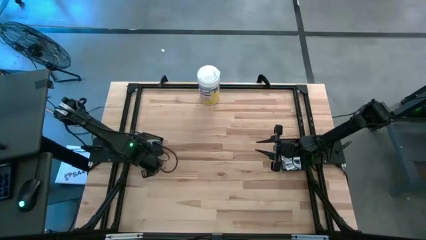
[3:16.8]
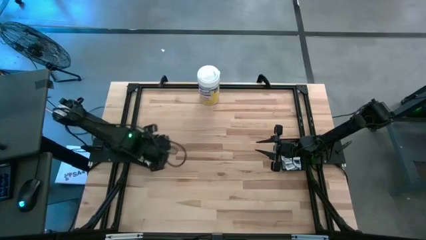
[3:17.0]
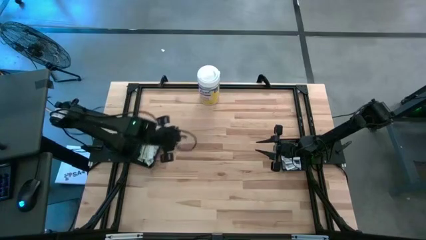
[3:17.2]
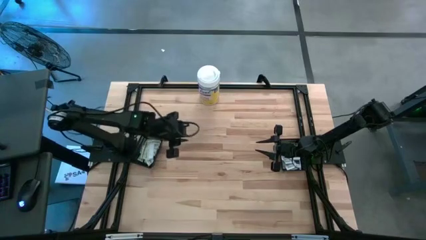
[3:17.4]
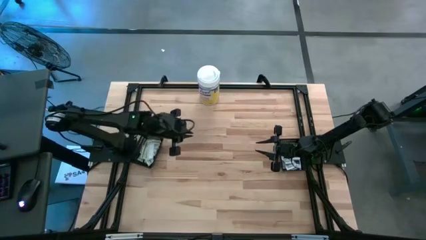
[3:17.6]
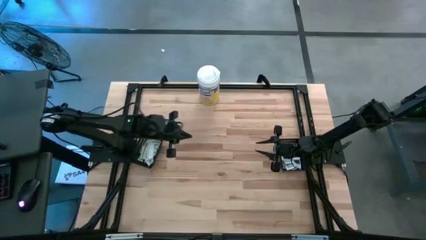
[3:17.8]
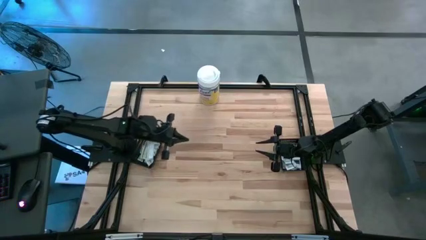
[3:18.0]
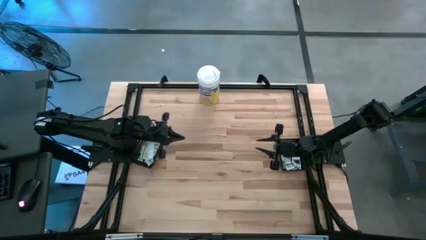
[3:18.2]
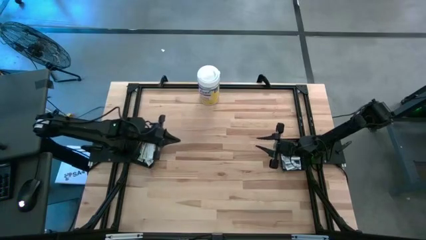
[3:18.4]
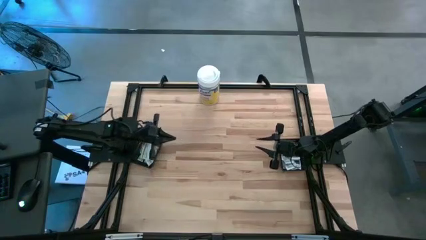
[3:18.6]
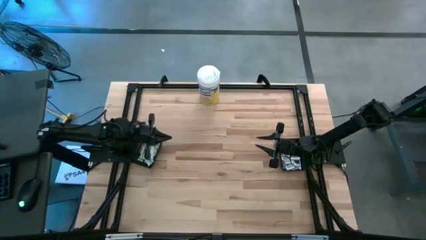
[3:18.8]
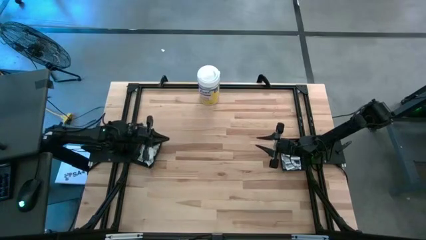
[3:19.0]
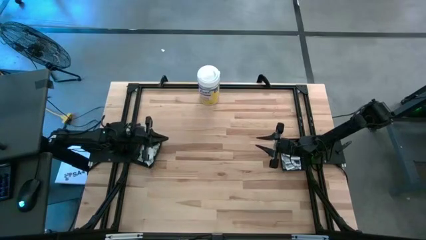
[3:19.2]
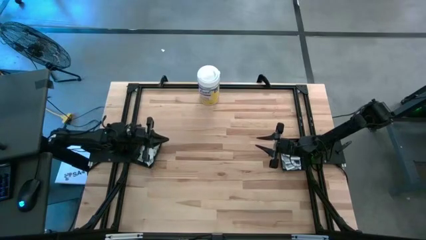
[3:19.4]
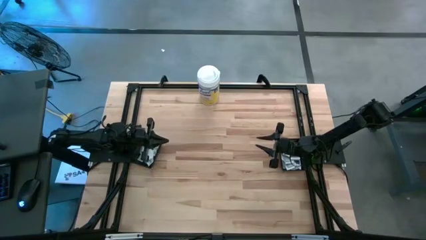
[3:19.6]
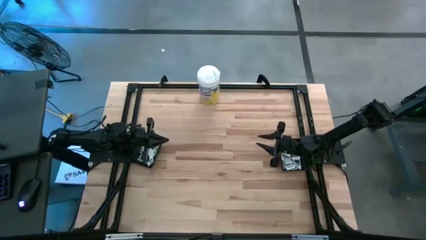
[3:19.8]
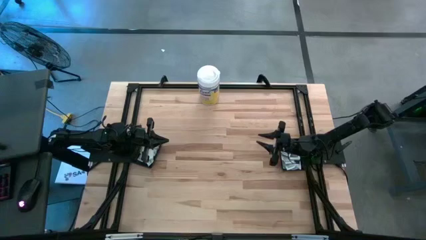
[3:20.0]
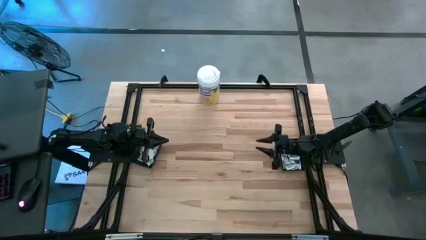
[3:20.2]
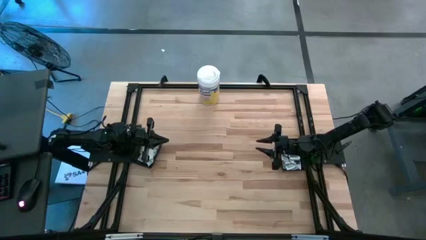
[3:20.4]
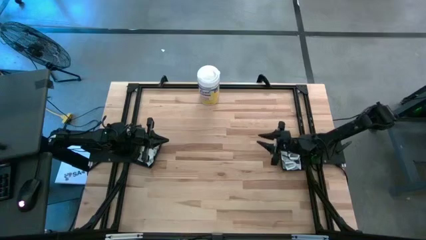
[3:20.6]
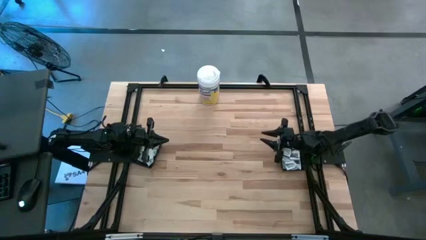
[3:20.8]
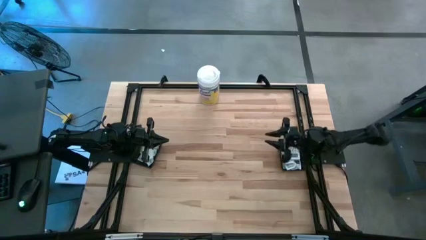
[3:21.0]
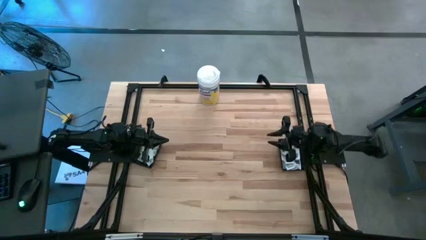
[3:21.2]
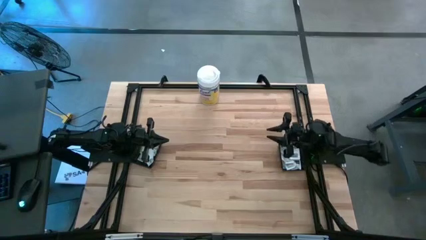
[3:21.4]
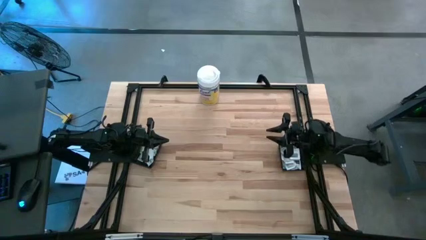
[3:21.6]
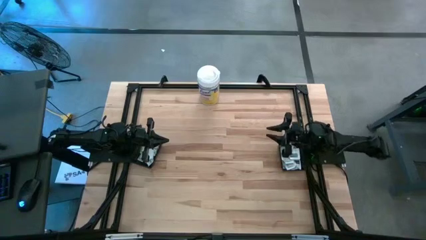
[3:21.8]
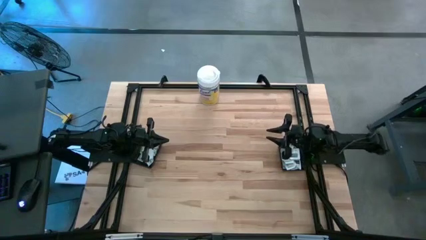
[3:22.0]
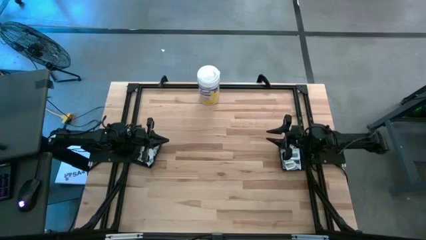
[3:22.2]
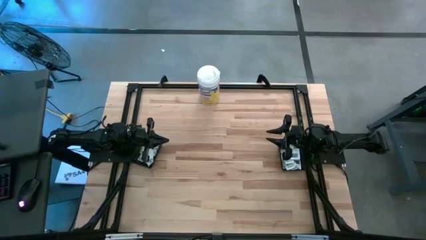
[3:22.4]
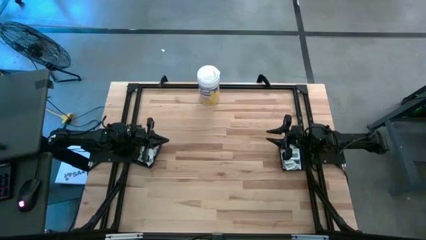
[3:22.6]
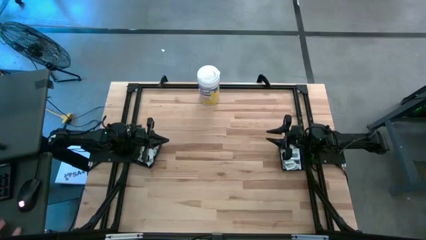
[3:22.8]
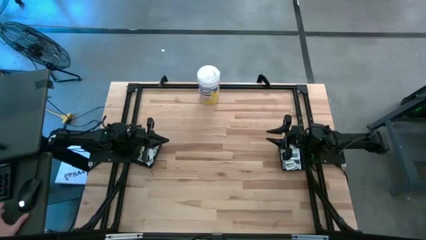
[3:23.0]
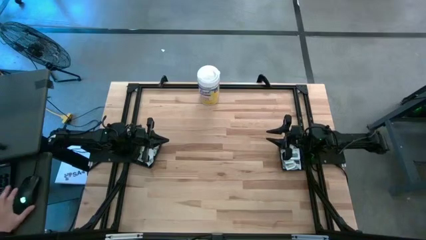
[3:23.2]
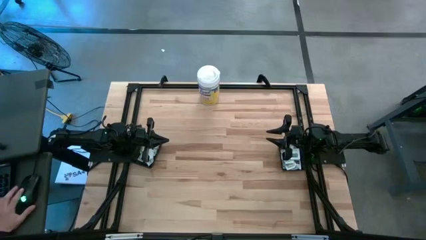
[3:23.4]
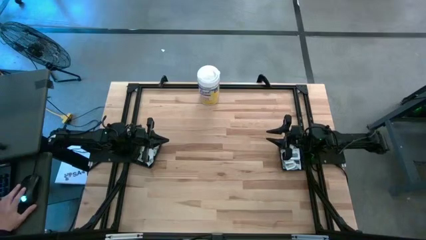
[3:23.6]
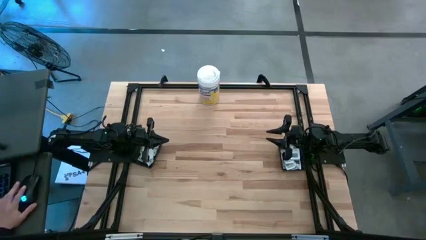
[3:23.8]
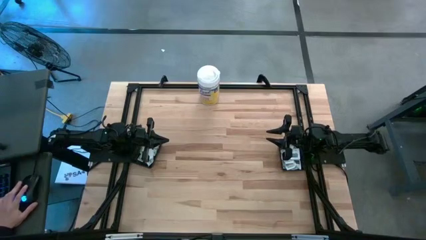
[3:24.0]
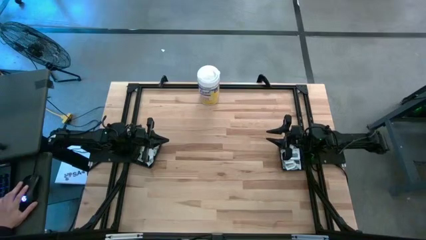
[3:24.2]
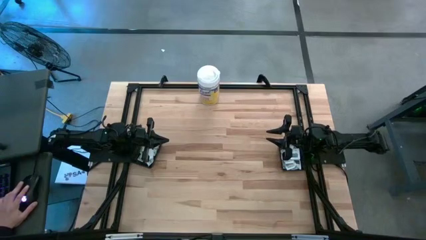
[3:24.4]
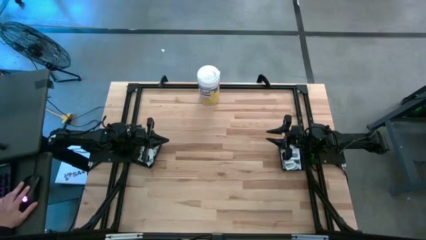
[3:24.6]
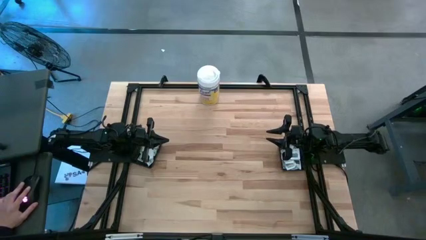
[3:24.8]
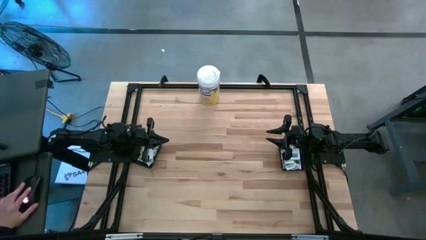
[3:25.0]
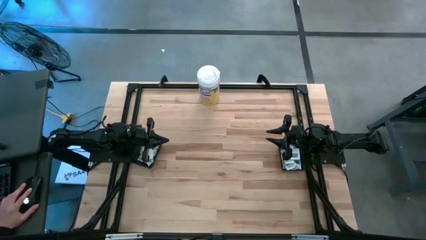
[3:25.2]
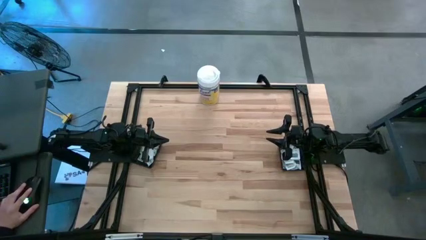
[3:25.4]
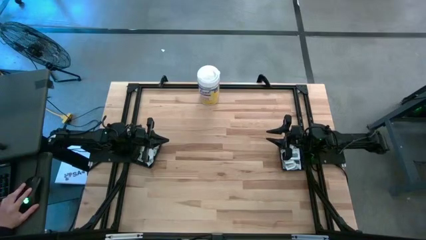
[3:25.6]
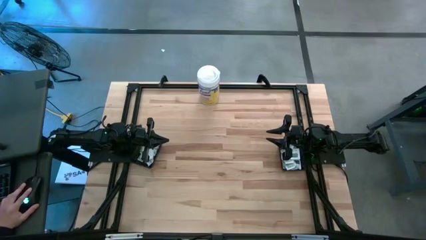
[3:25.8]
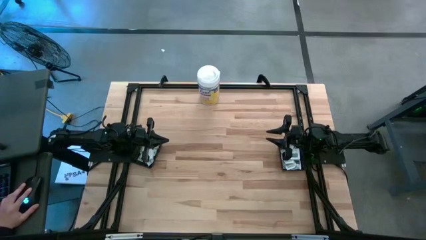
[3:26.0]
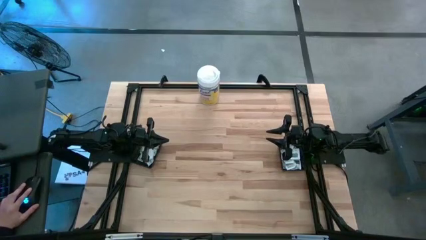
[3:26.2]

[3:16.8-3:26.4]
Task: Pick & Place First Aid Supplies
Return to Home Position

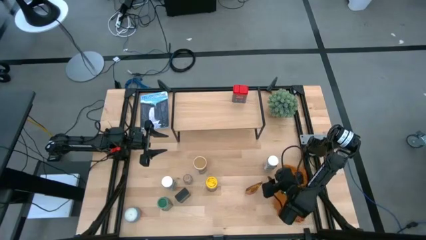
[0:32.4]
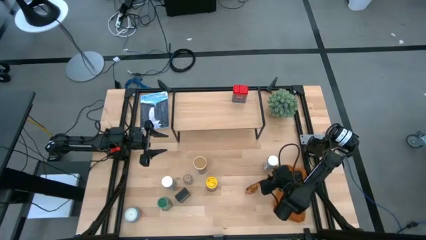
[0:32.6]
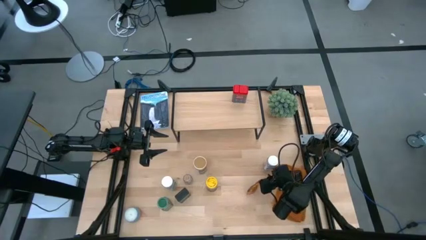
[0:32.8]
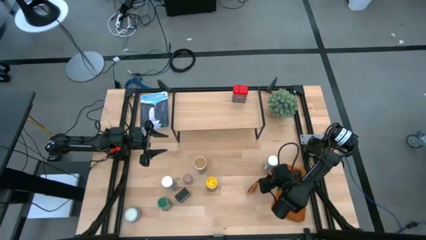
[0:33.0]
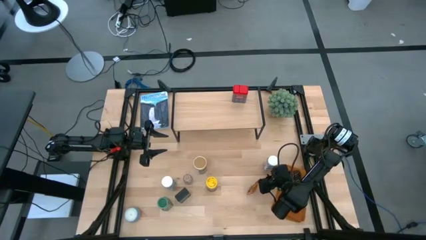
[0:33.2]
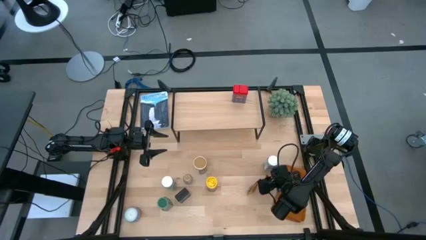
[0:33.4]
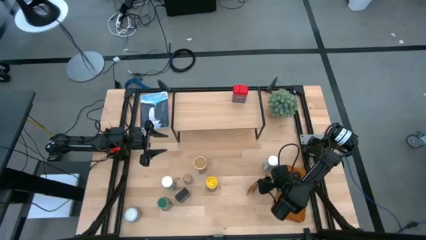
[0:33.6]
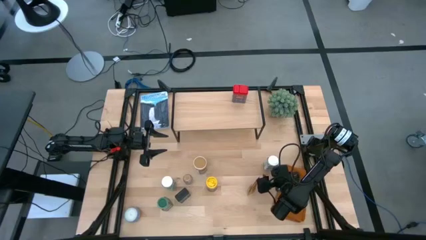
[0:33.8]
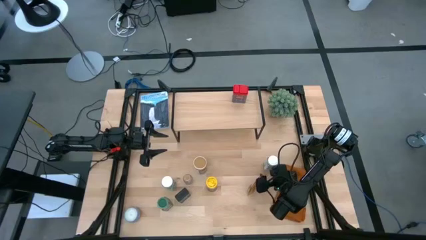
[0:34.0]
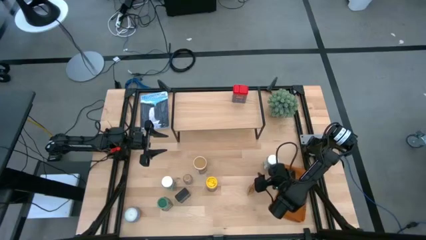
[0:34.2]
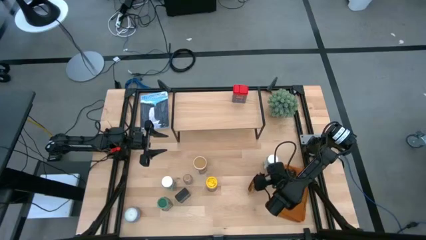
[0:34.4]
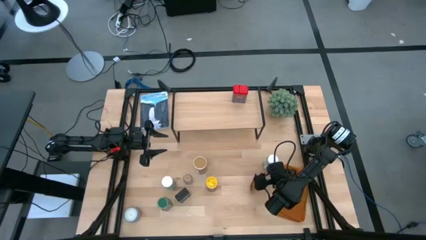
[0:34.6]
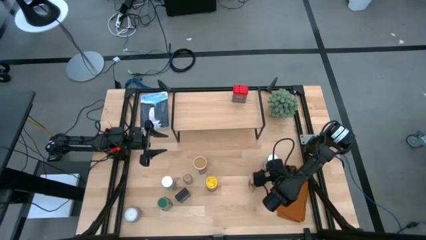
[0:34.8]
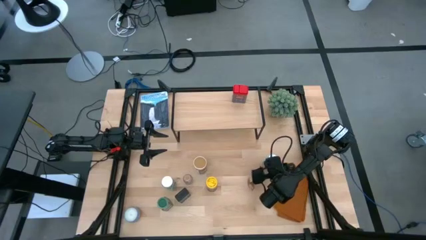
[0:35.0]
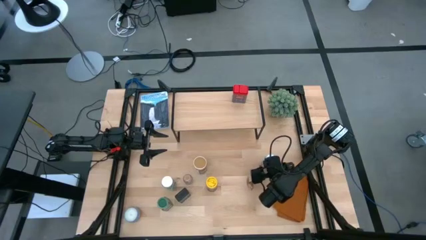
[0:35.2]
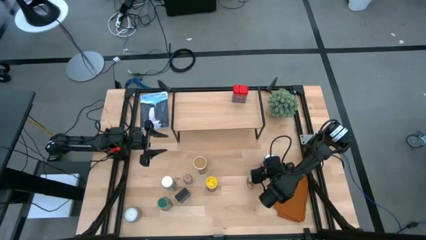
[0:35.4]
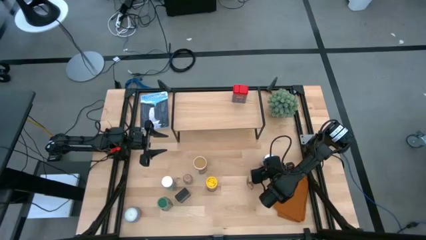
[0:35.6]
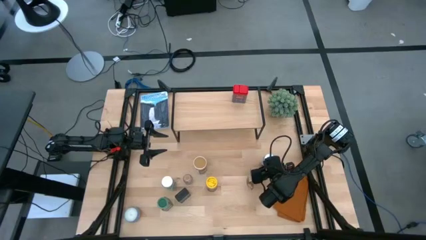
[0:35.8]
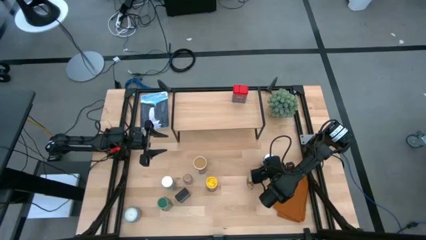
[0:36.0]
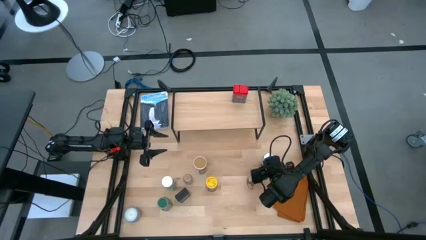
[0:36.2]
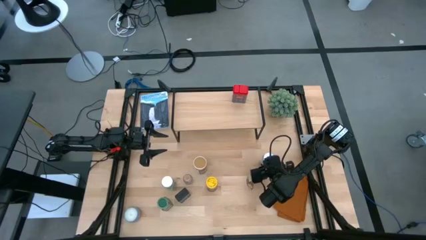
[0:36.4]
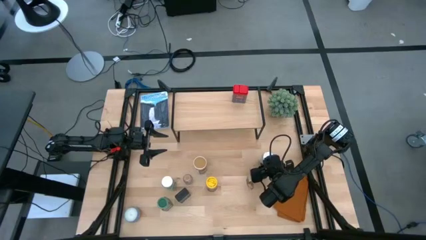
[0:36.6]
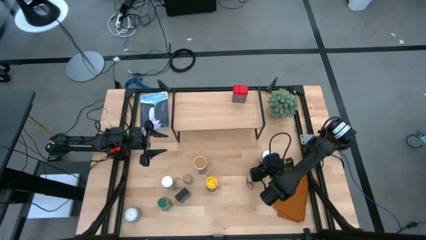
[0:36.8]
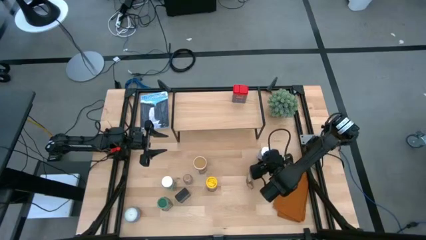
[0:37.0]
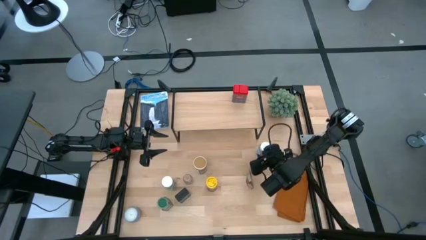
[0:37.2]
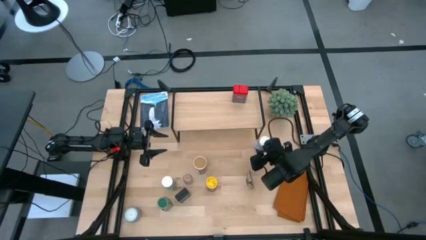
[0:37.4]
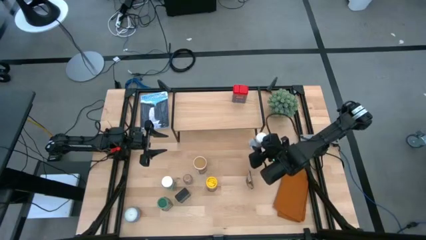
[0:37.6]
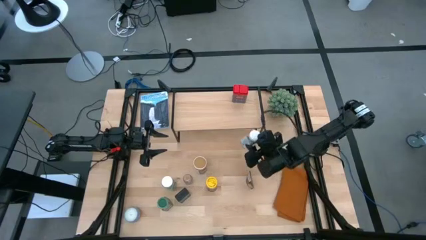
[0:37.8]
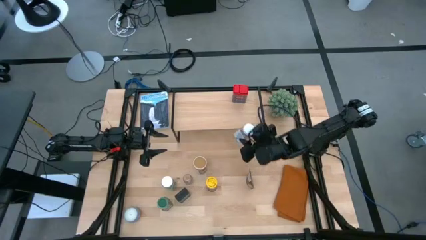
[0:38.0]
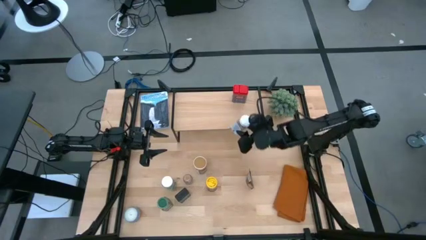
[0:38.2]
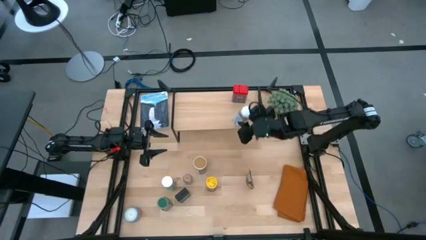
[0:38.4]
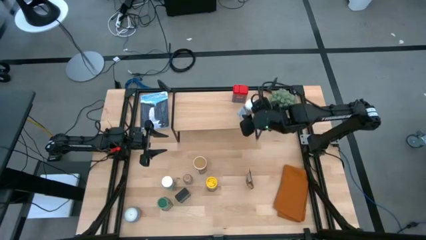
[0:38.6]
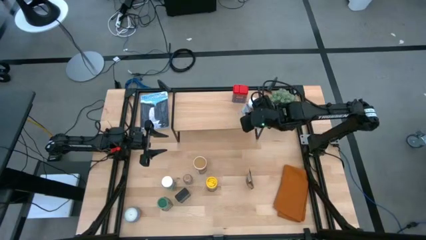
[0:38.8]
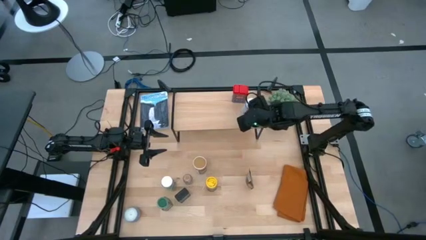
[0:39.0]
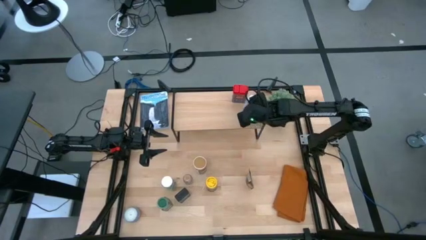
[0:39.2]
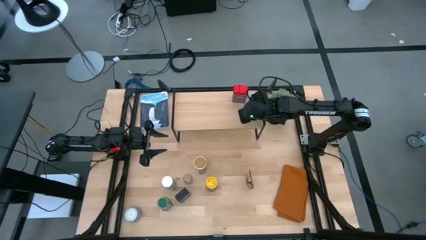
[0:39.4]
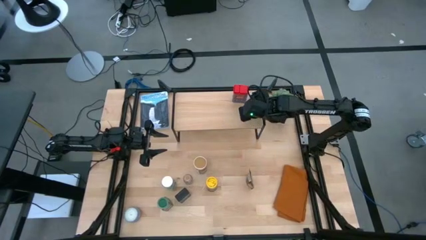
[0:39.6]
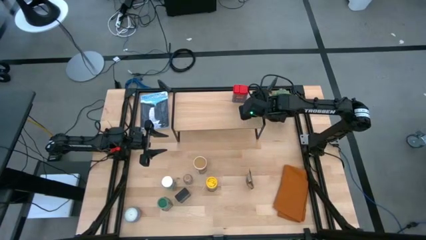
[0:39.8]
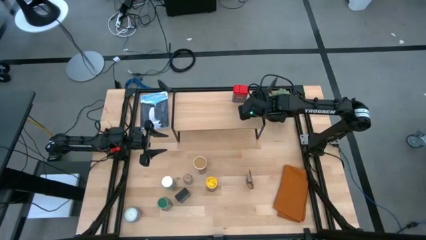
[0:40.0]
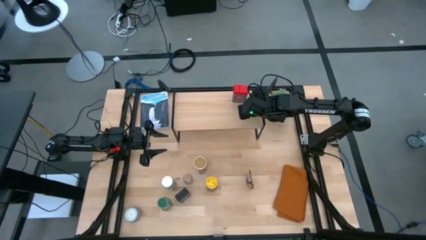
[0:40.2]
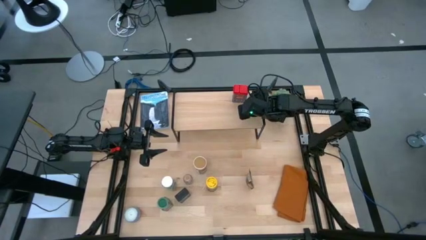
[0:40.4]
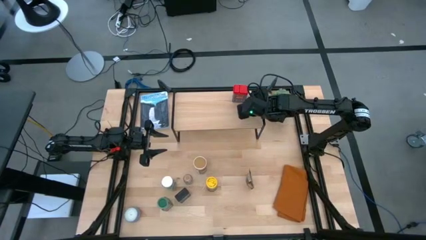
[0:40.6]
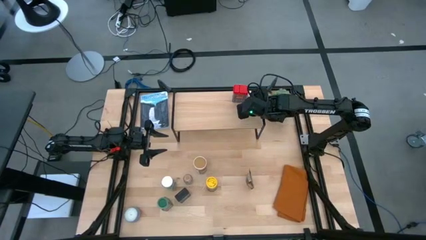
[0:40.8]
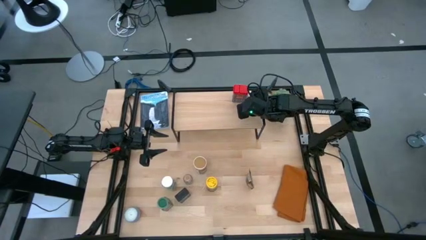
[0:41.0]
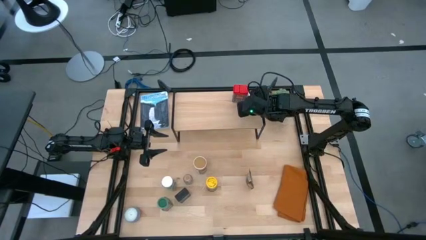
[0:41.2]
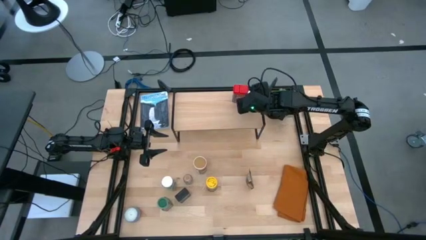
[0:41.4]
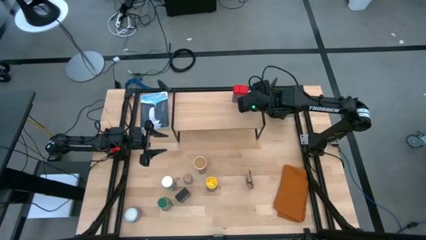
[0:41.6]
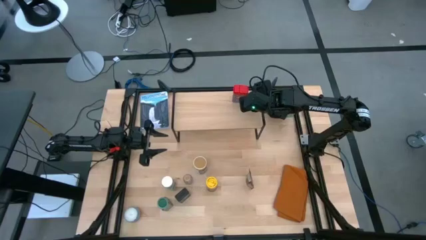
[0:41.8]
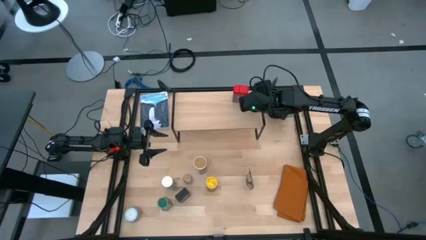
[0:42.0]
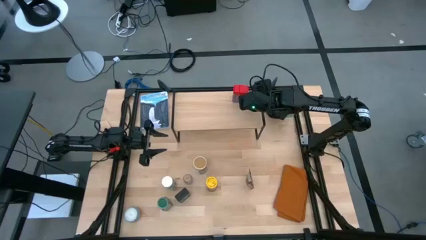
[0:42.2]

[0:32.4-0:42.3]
Task: Shelf spices
Put the right white seasoning bottle on the shelf aligned with the other red seasoning can
